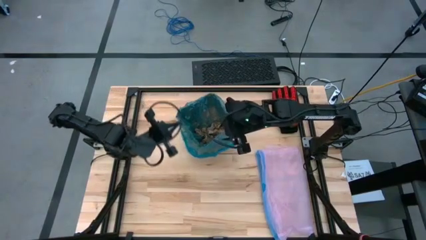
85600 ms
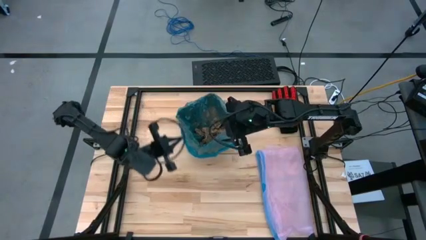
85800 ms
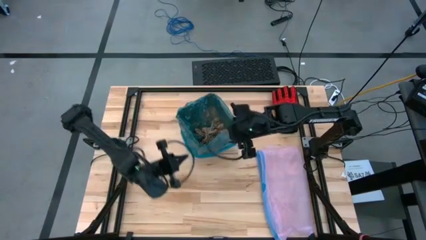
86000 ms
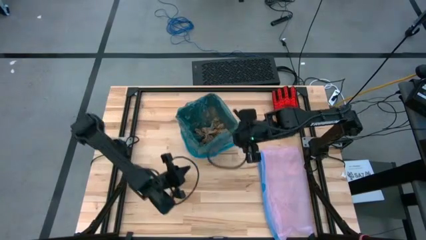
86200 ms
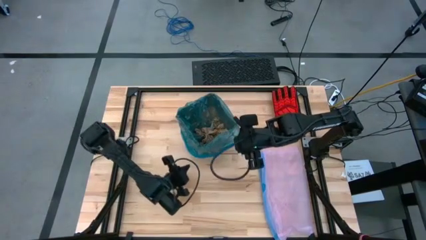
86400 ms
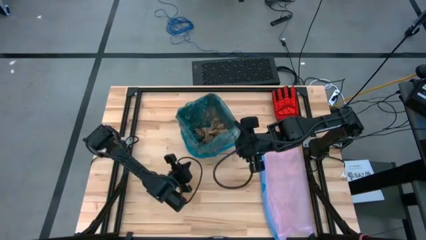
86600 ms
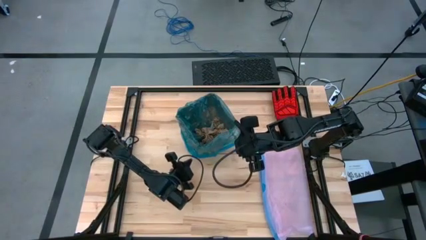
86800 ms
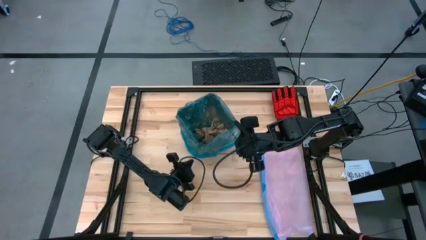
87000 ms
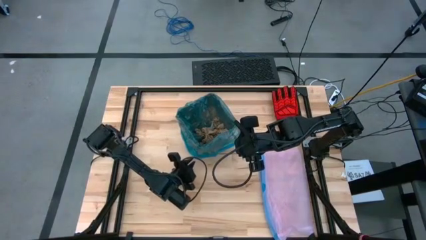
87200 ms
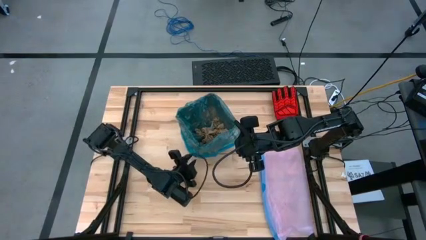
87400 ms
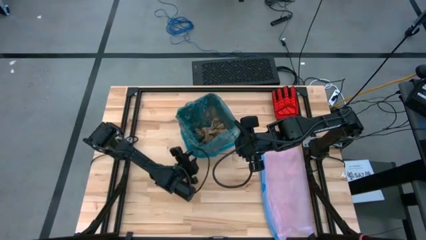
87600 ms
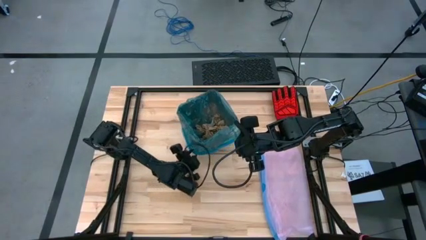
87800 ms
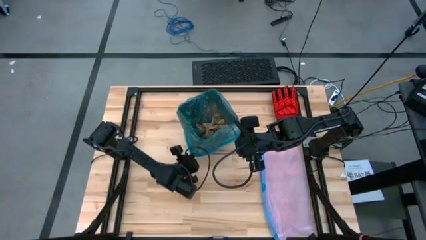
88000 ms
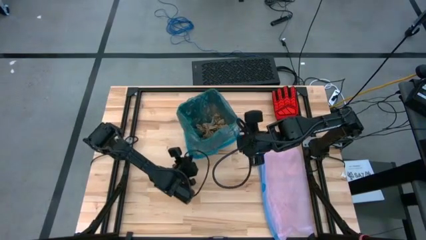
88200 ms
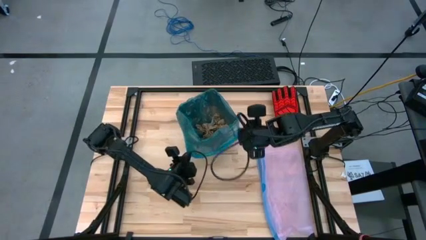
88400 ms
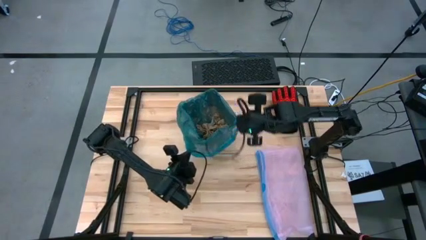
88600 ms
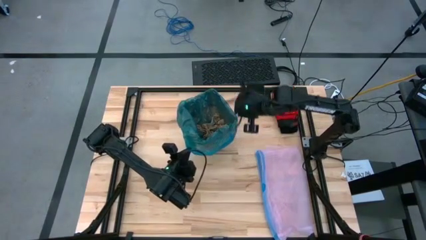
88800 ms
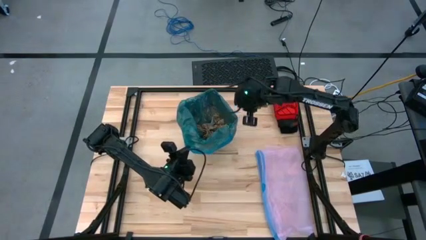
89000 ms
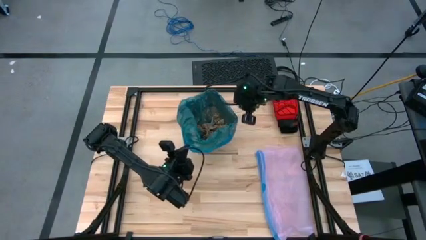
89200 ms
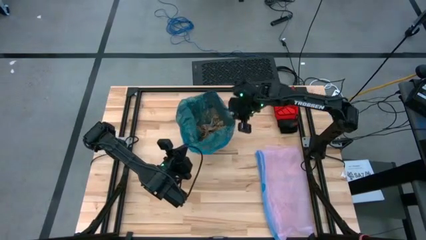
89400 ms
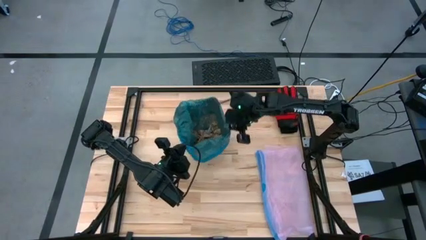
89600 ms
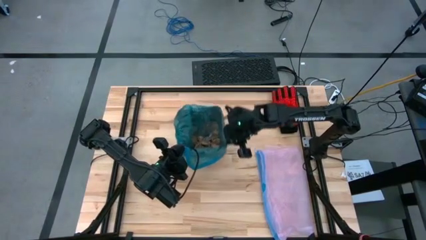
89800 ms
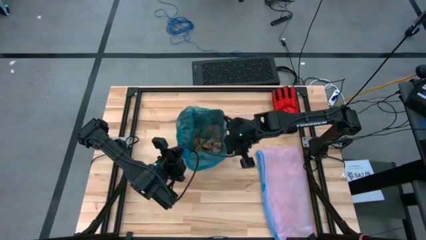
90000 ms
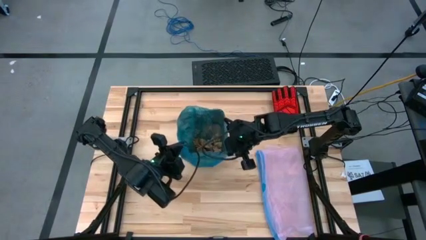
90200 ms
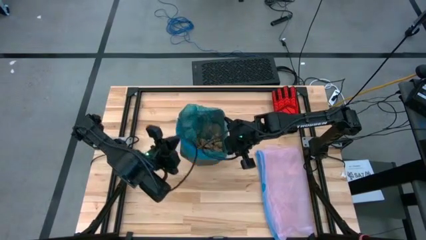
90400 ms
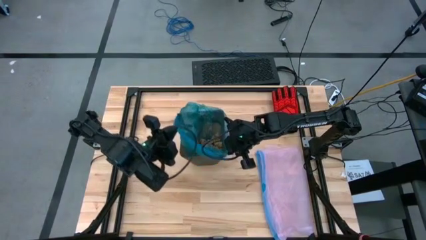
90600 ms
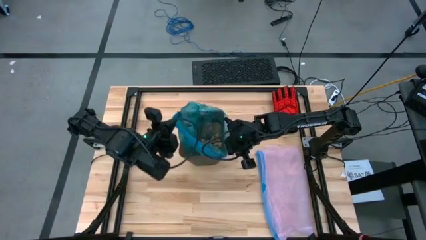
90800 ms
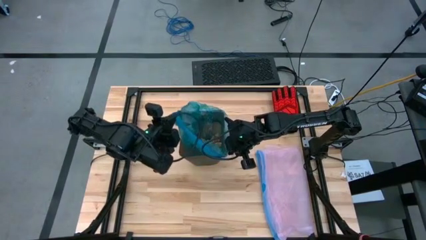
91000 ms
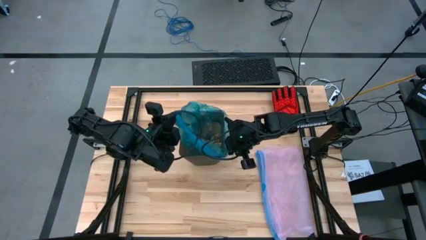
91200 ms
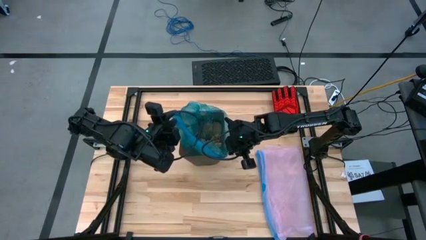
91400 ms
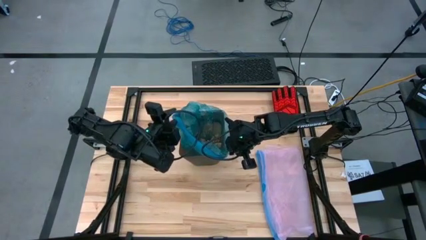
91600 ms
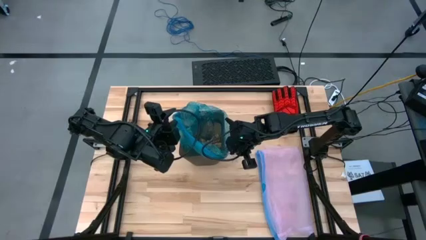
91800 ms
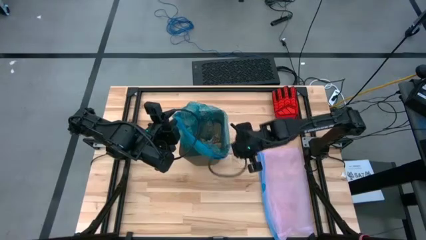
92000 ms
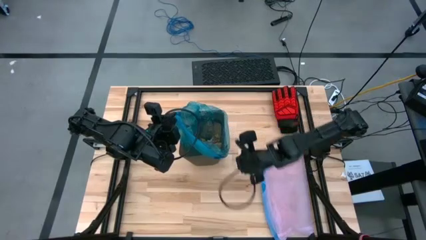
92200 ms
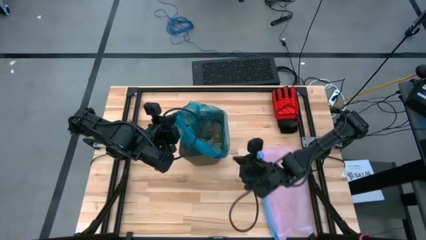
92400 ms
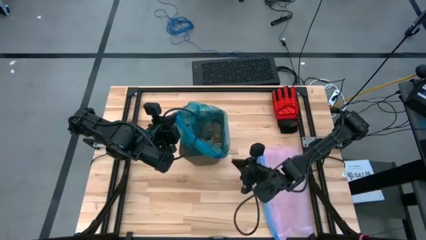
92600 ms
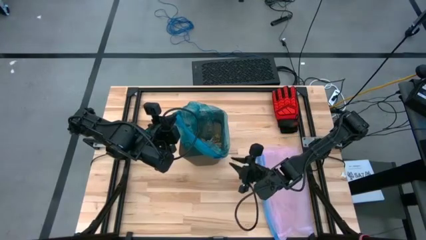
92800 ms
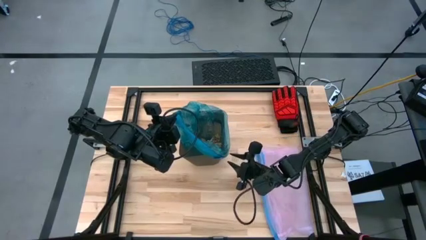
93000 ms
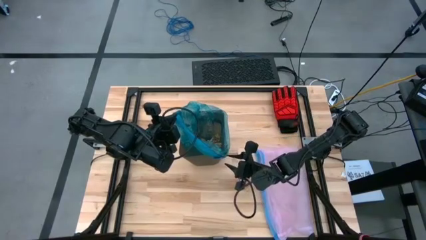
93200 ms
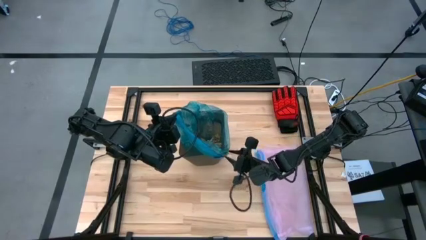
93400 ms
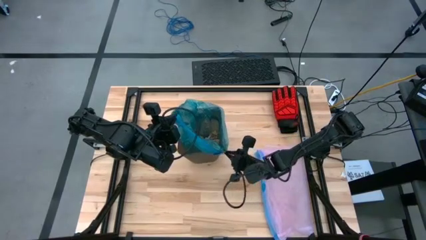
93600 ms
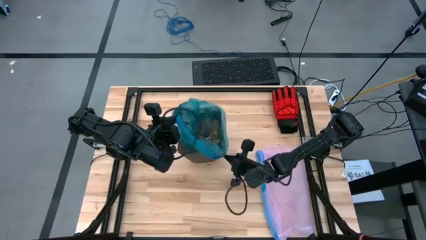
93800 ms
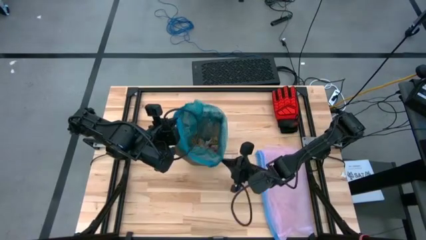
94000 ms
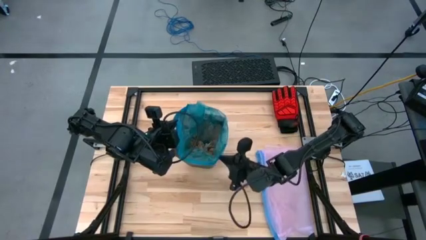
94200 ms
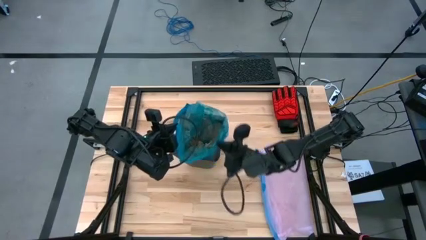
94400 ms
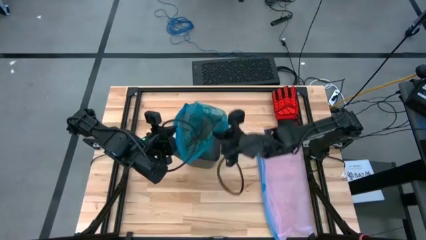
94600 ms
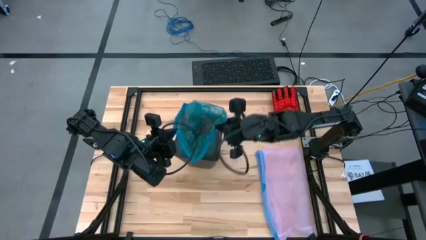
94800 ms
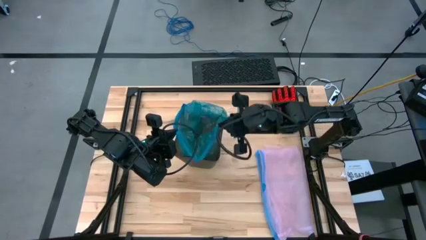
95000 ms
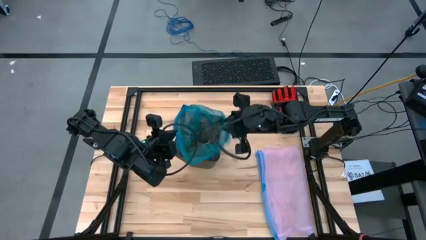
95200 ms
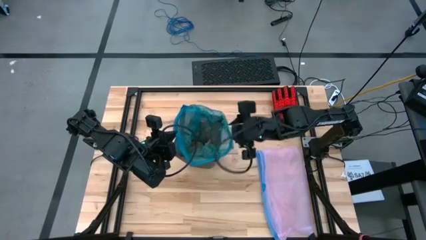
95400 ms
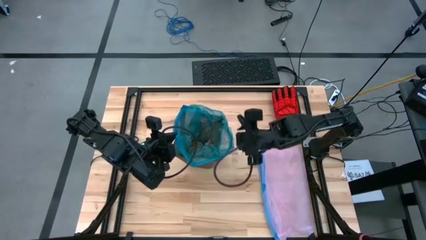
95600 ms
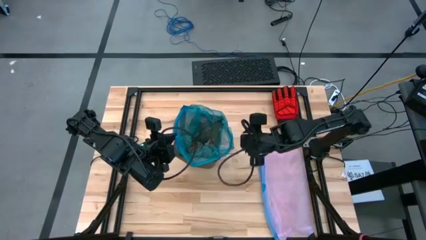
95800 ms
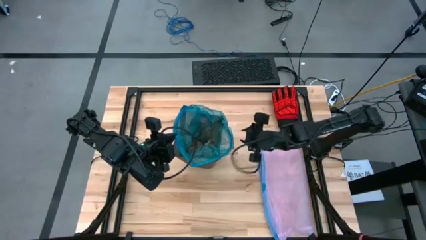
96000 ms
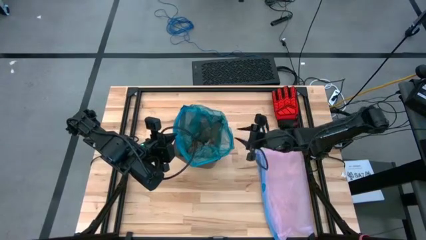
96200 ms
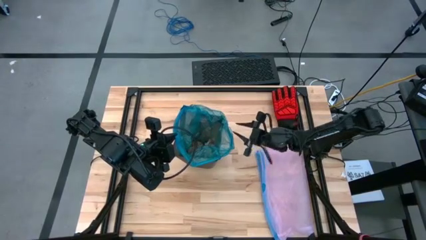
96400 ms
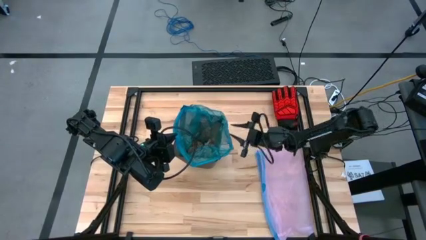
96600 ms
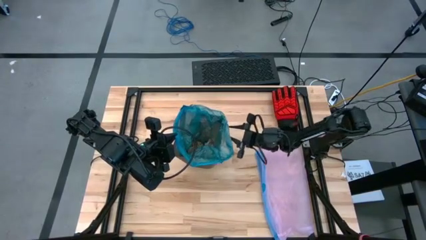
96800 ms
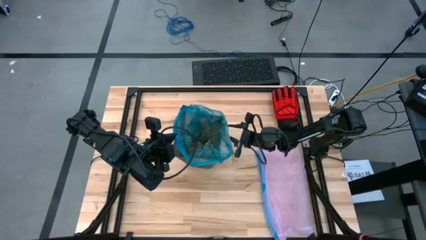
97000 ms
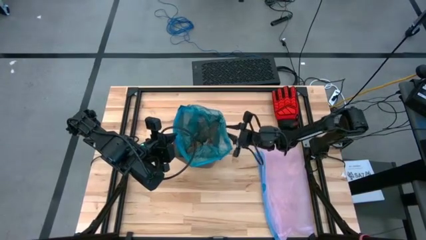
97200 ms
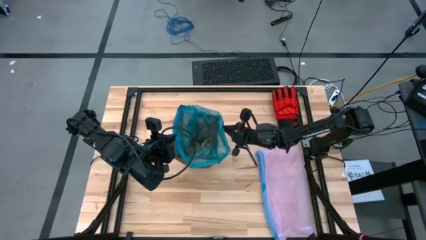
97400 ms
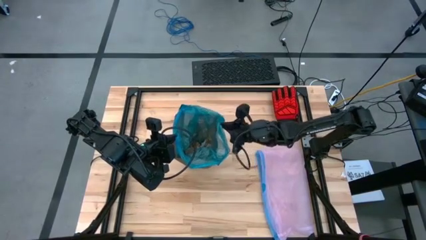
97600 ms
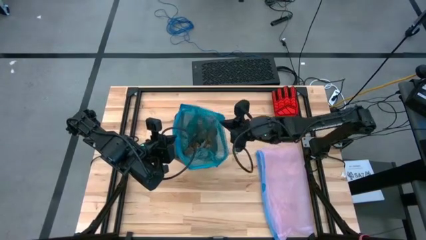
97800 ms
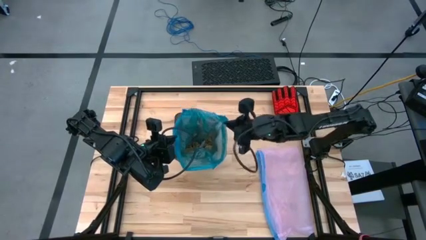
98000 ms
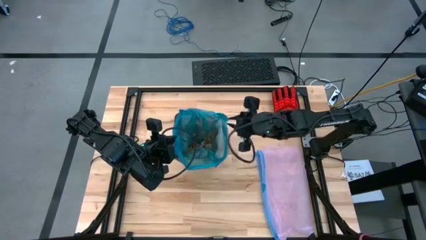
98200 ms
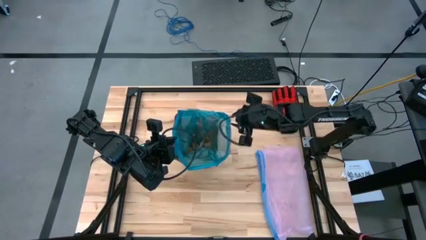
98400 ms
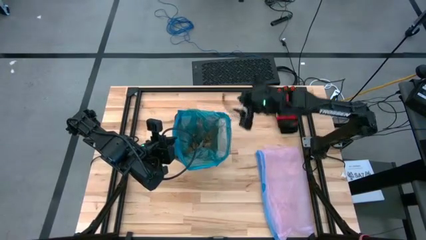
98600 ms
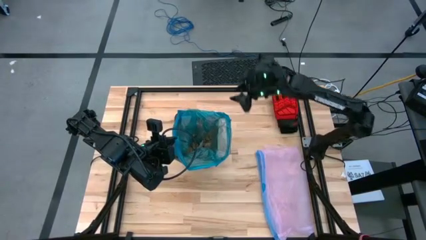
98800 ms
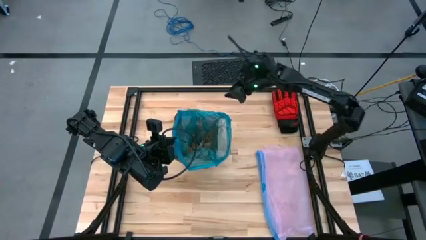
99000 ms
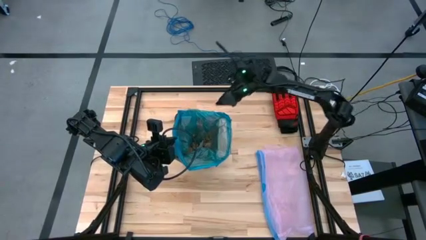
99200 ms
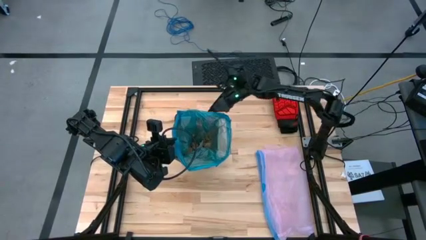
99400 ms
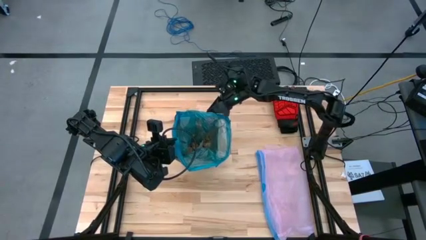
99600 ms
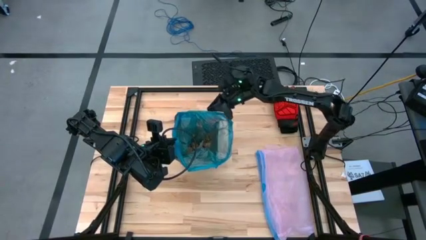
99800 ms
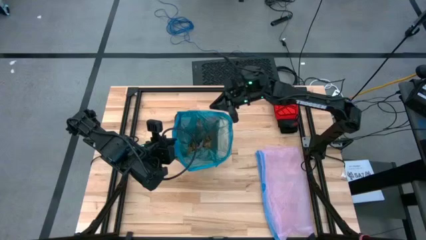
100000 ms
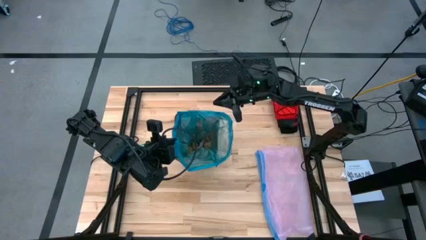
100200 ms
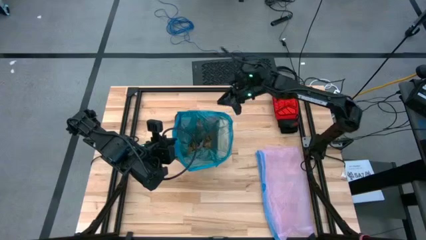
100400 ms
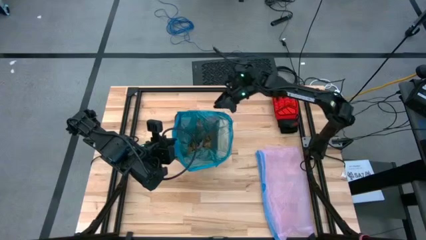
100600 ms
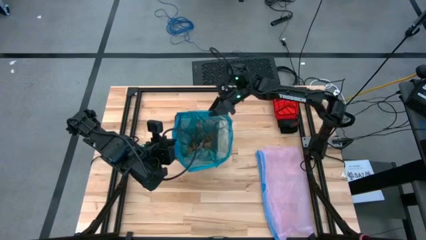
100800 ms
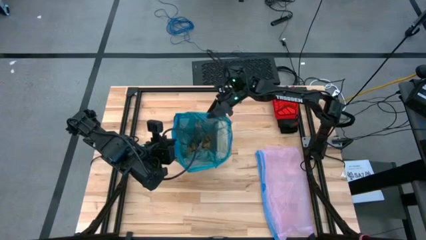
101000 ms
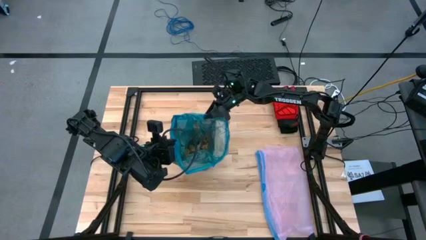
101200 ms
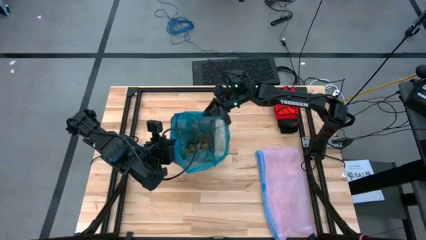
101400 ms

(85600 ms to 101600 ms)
Task: place trash/remove bag and relplace
Close the blue trash bag

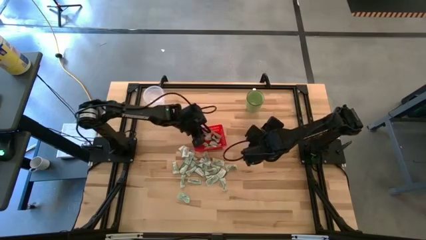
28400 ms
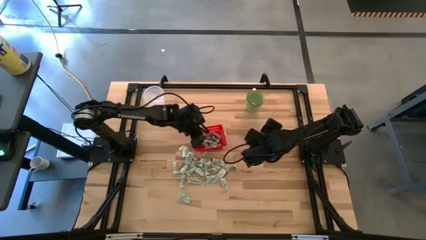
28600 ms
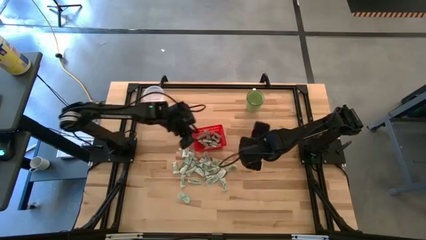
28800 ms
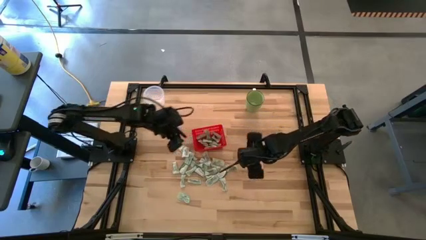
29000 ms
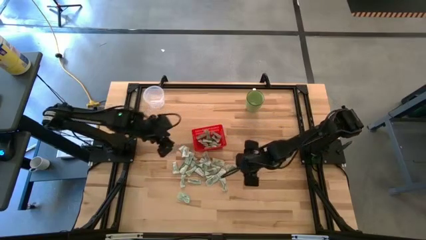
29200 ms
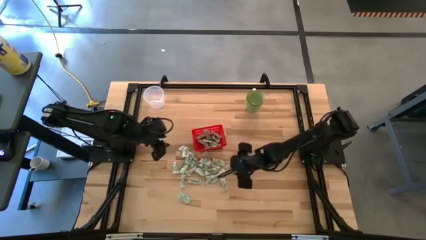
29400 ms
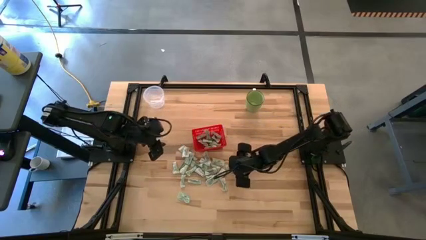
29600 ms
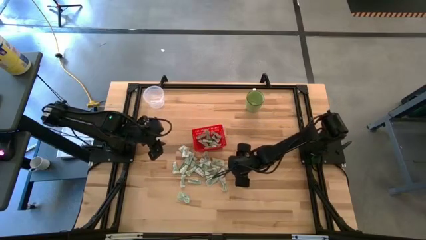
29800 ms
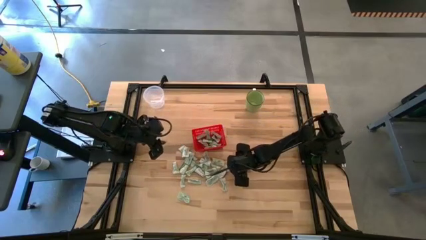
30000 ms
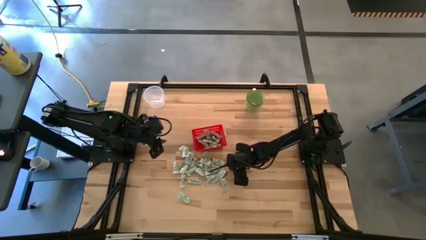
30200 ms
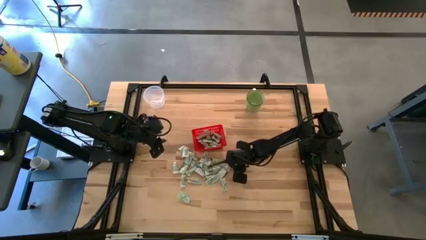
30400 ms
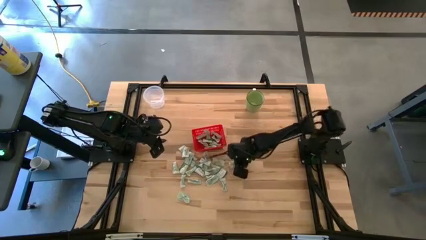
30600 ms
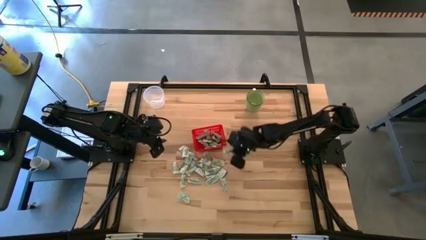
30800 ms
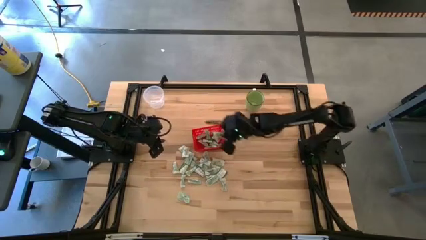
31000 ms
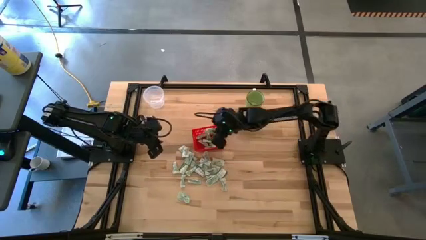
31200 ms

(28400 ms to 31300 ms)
Task: Pick and place Stevia / Truvia into bins
Put the stevia packet into the red basket
